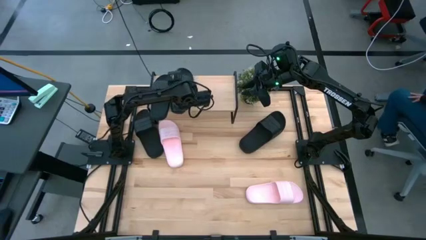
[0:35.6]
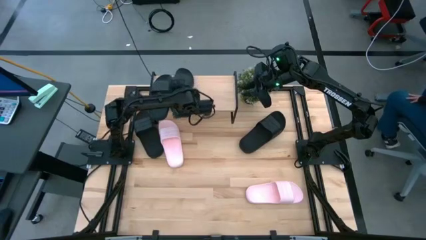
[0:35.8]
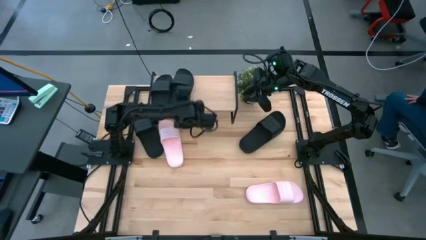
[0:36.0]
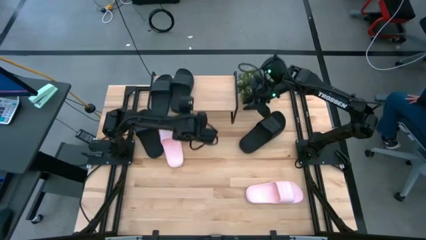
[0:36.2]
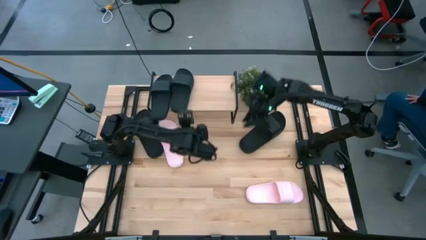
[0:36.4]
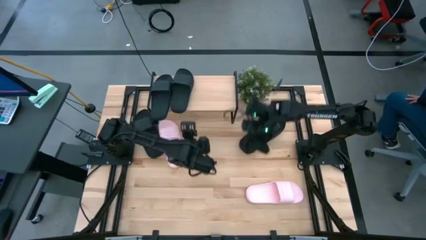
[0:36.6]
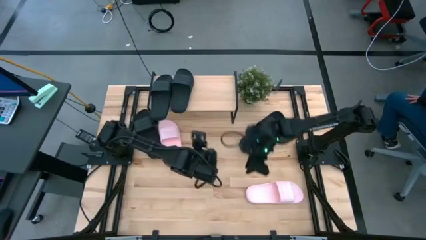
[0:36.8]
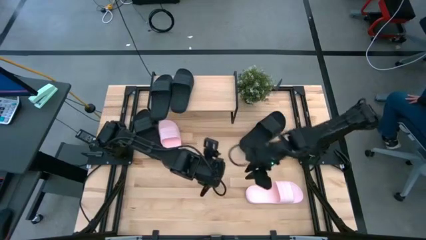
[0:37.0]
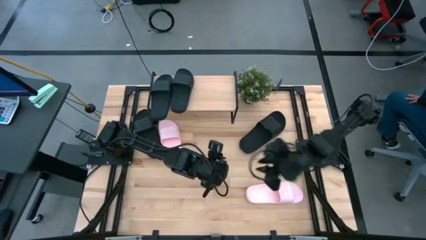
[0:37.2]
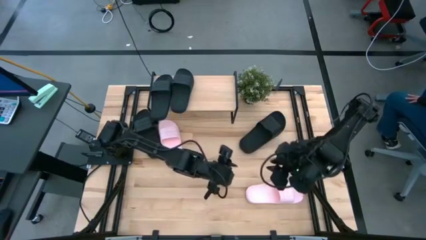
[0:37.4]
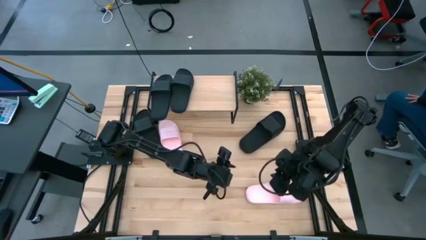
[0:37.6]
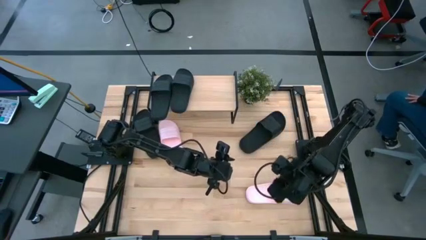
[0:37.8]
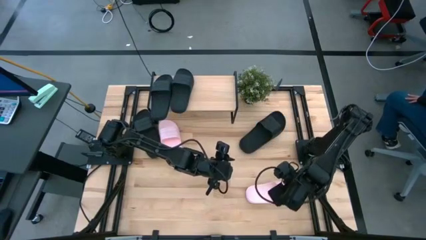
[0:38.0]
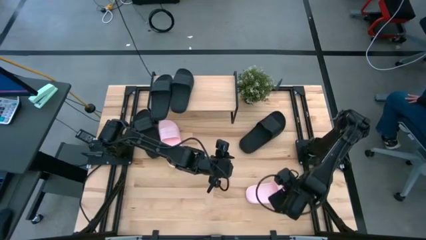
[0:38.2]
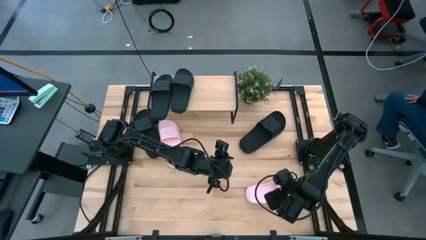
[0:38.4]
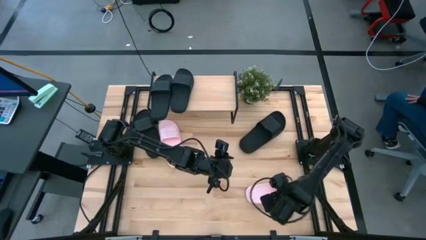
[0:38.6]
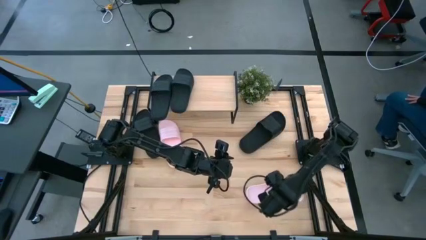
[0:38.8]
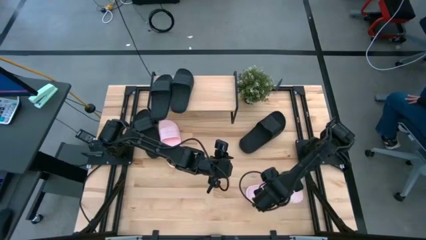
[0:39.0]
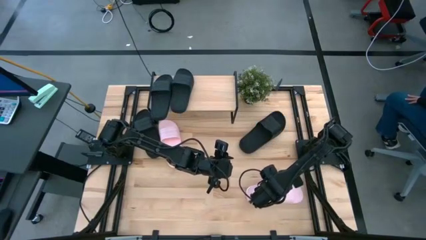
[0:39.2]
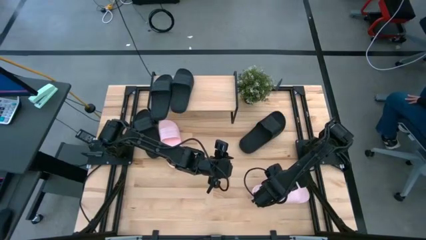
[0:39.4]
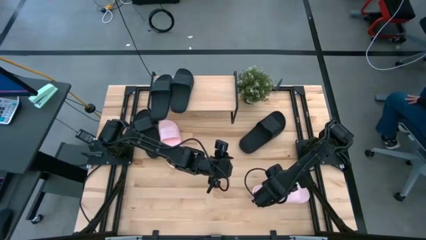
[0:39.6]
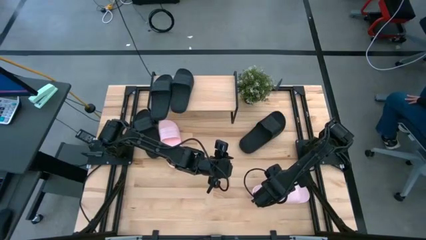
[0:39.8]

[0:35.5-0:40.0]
Task: Pick and place slides into the shelf
Put the right pink slipper on the shelf

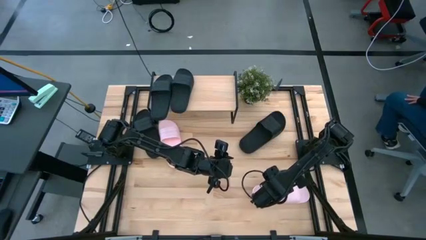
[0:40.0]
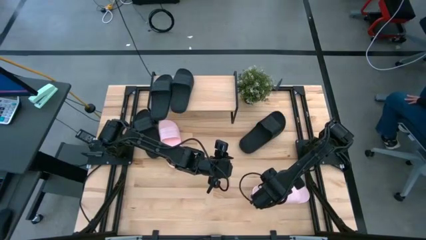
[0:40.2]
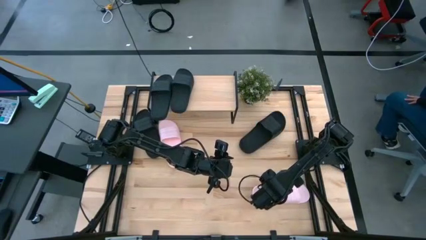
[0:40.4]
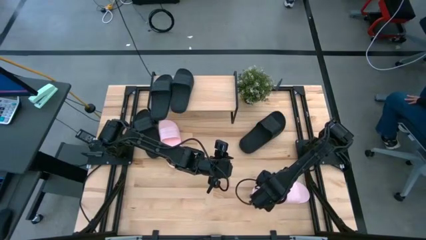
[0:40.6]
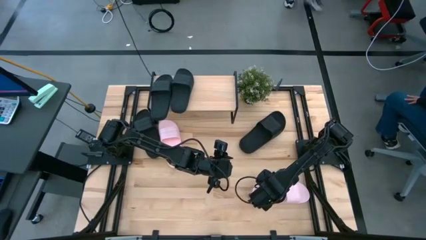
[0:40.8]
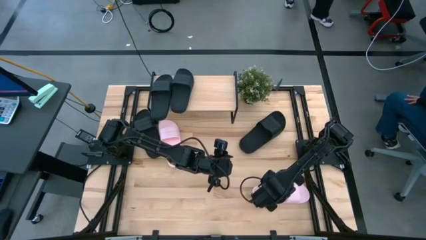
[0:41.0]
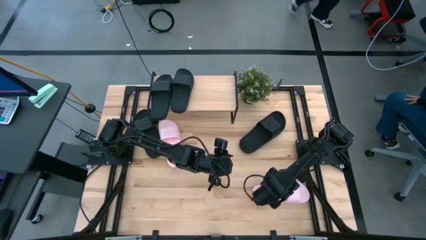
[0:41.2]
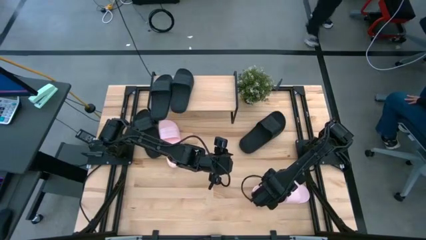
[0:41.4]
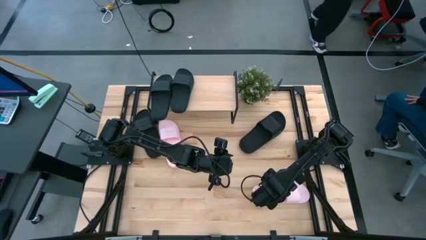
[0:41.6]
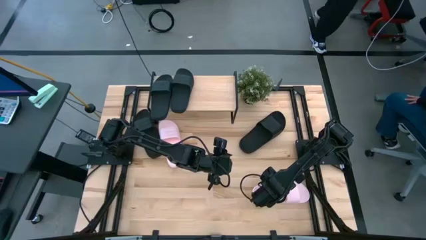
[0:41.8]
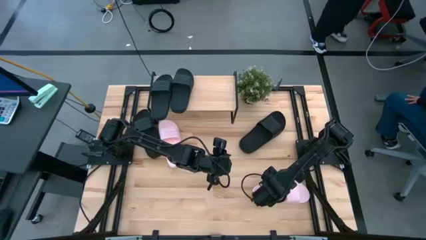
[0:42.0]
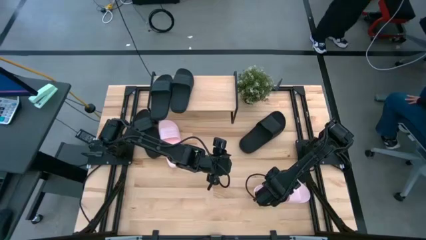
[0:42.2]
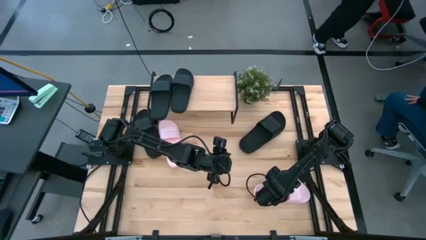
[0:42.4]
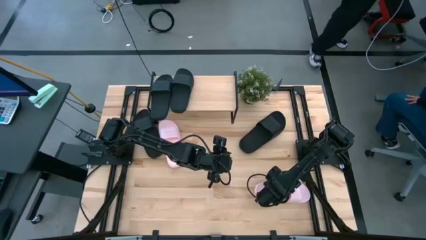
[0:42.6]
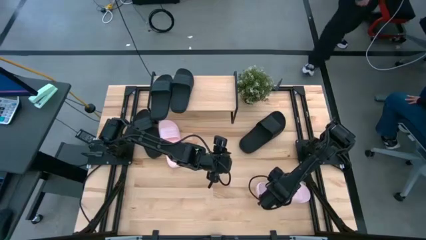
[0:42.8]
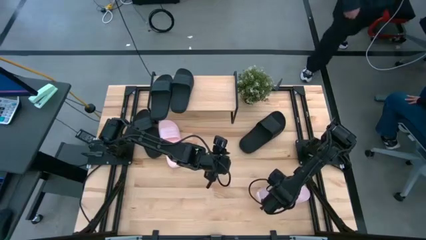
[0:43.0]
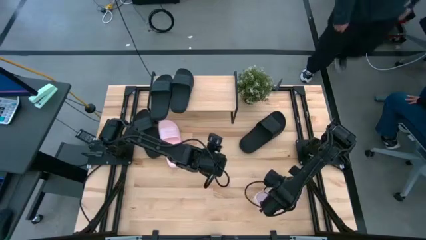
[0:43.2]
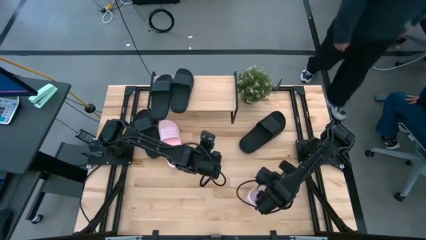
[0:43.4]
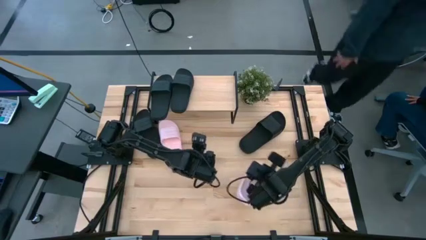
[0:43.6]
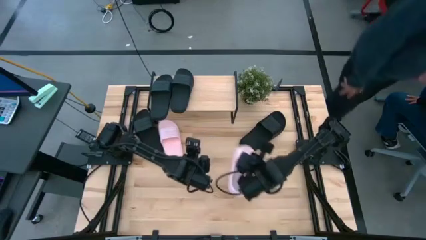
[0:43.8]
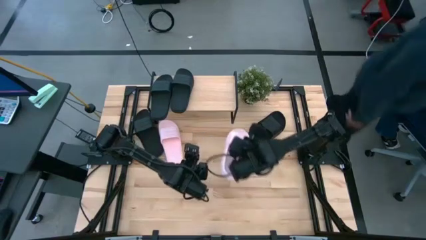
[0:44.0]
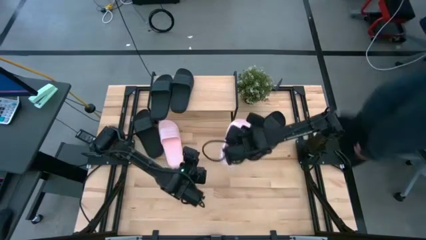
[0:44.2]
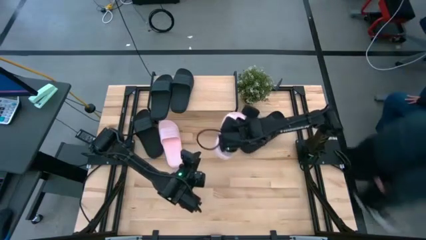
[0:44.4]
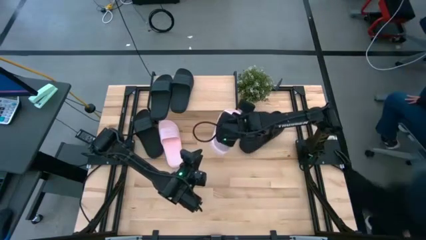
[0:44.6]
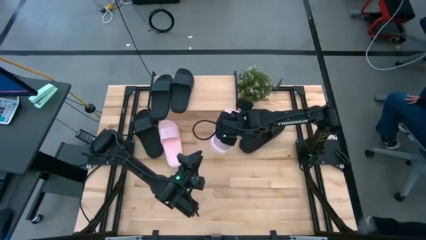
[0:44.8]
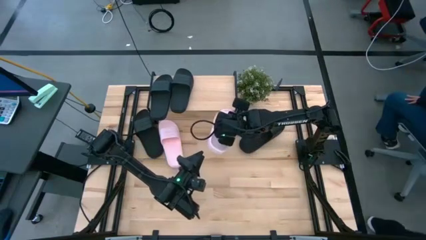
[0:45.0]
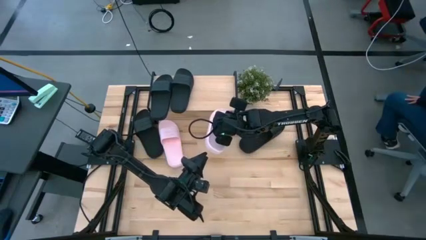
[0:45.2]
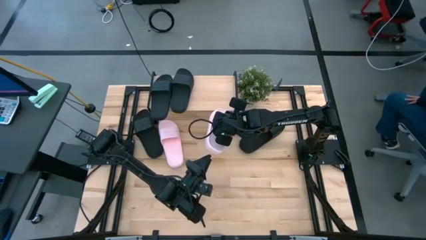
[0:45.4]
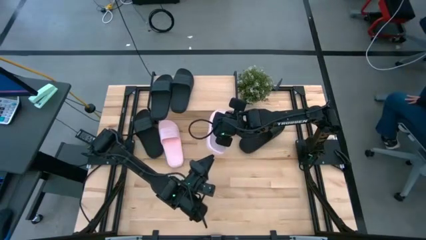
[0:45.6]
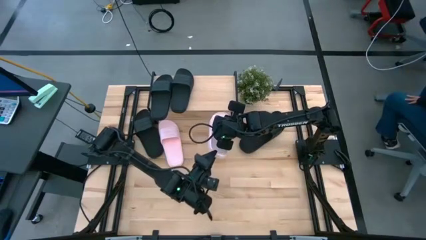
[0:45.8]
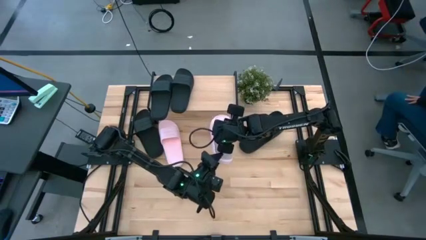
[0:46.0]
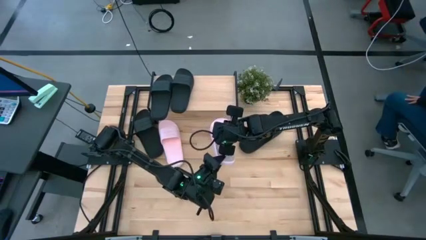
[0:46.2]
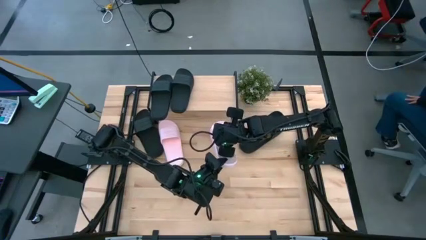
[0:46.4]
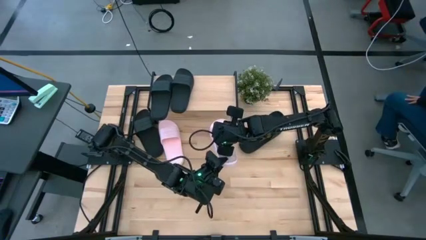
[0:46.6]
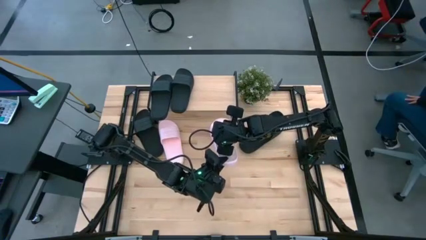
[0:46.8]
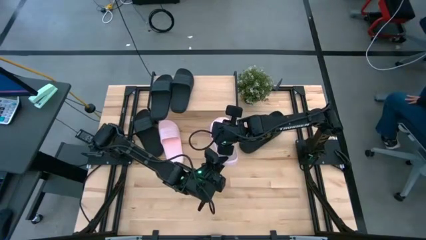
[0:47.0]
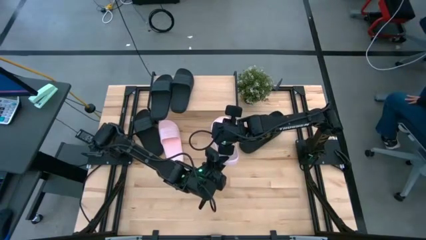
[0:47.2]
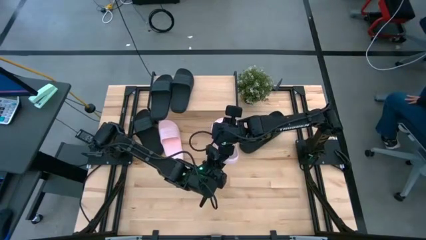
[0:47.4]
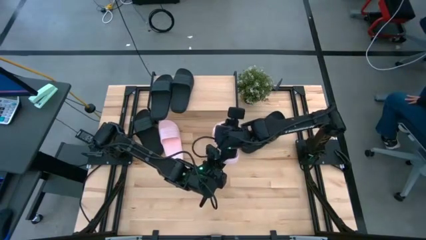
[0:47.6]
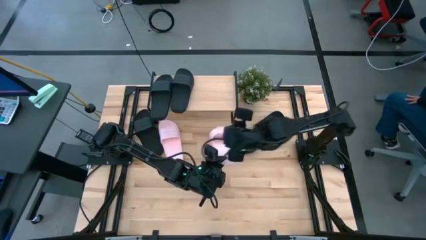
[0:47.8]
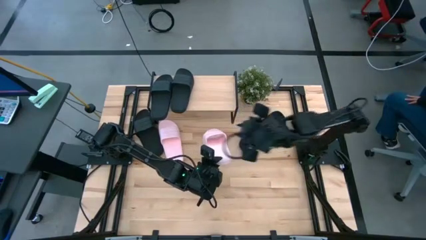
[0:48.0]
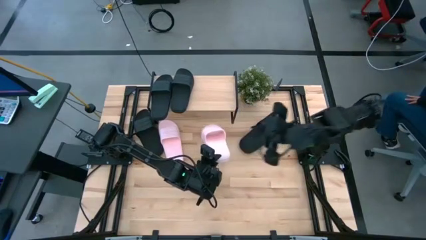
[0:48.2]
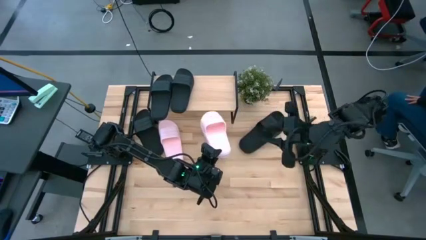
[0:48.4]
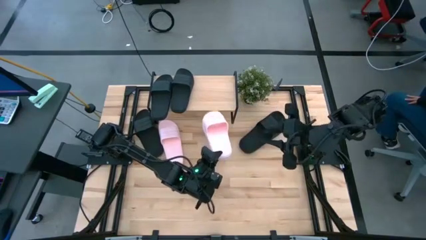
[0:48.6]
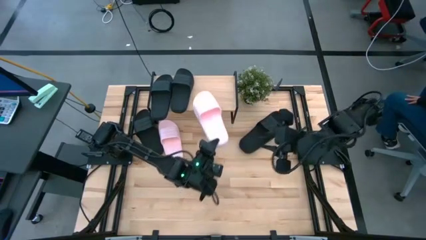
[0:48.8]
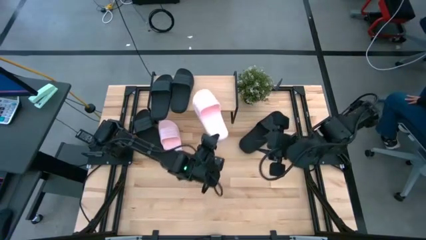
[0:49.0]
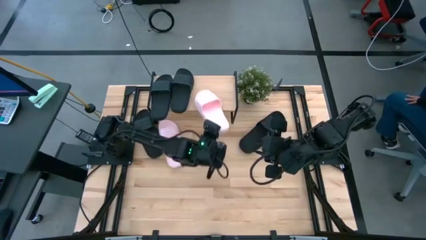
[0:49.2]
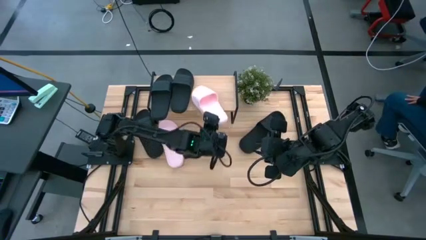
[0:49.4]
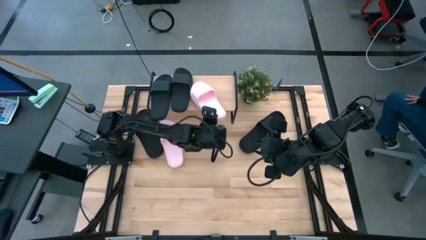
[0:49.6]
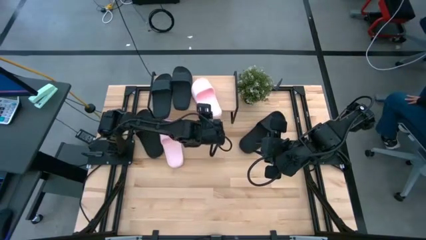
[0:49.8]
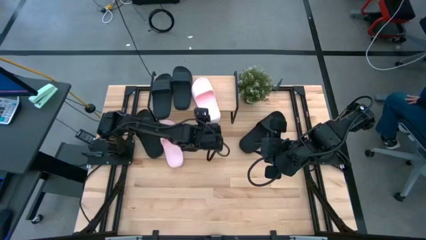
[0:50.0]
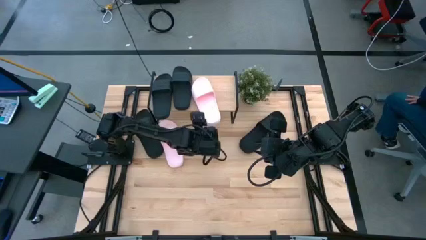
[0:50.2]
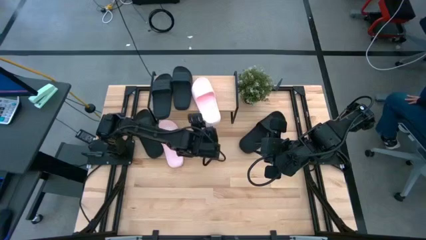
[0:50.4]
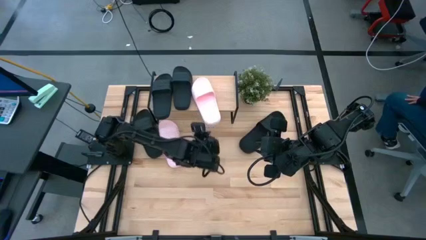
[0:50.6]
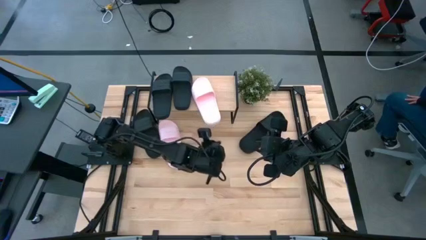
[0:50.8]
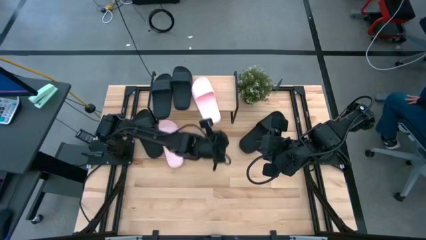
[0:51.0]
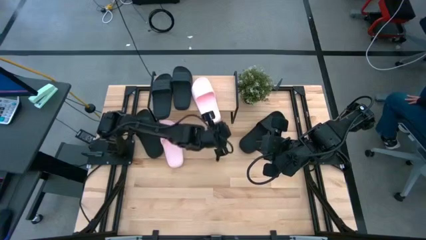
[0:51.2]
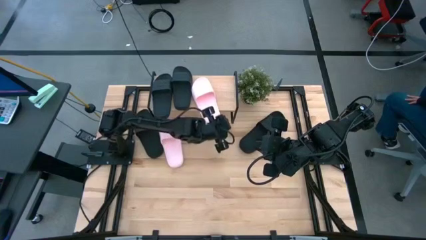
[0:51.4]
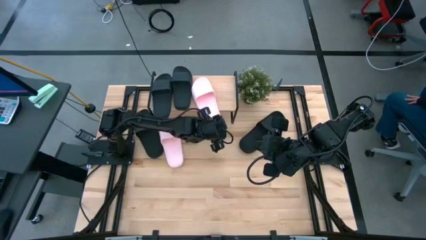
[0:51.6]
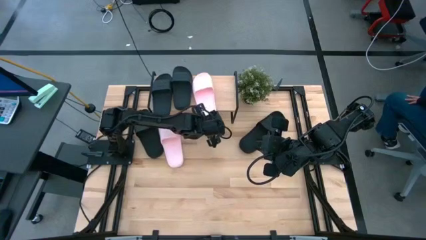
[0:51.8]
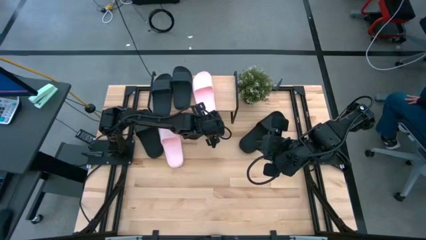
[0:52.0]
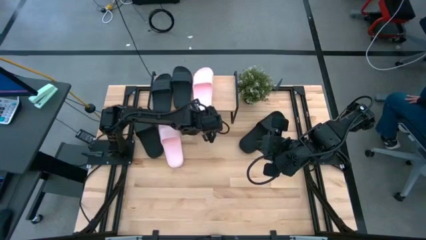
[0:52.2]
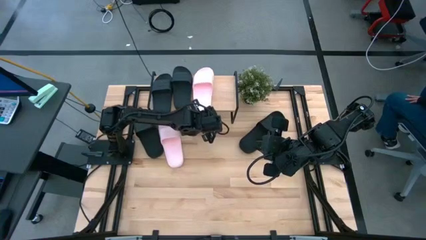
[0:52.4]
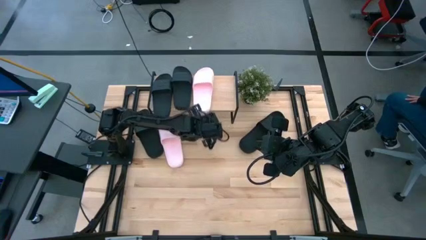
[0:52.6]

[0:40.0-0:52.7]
Put the pink slipper on the shelf
